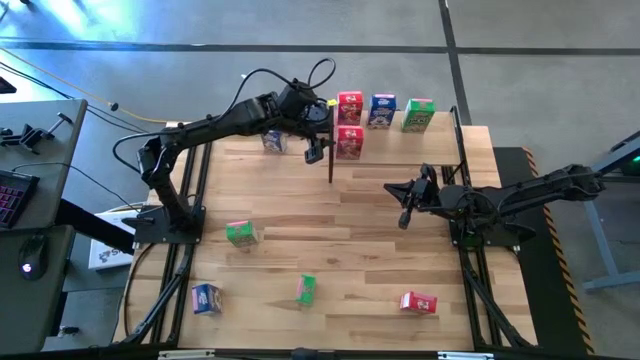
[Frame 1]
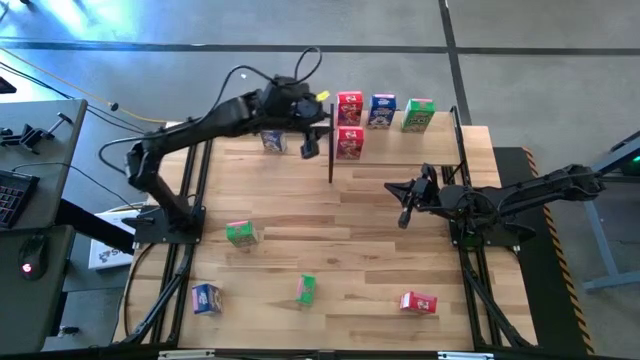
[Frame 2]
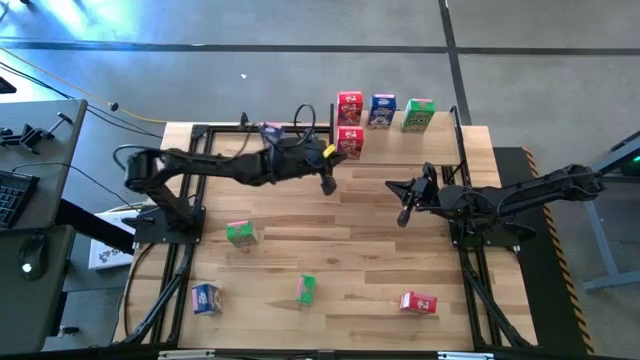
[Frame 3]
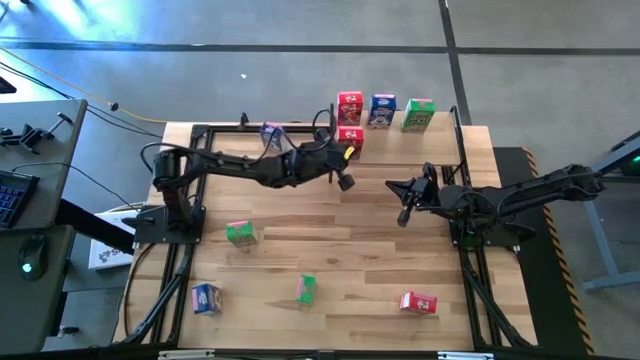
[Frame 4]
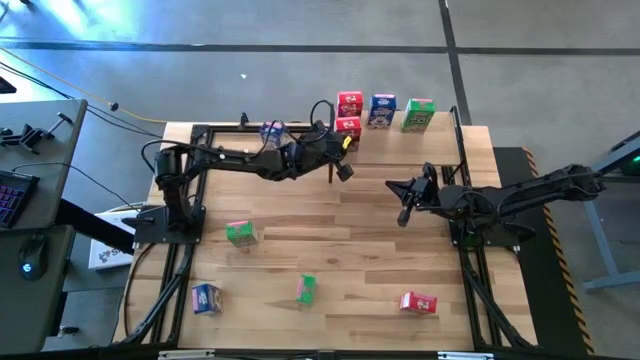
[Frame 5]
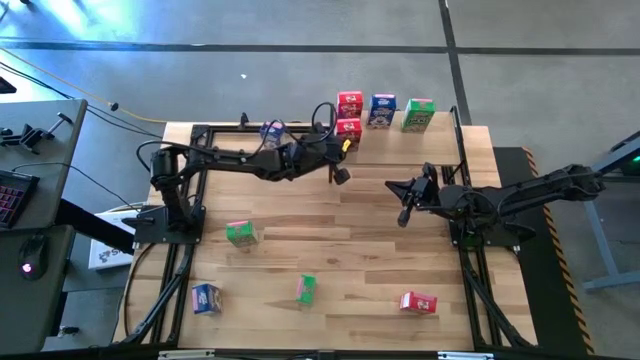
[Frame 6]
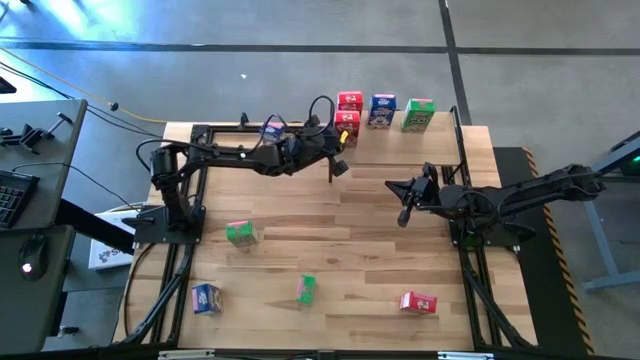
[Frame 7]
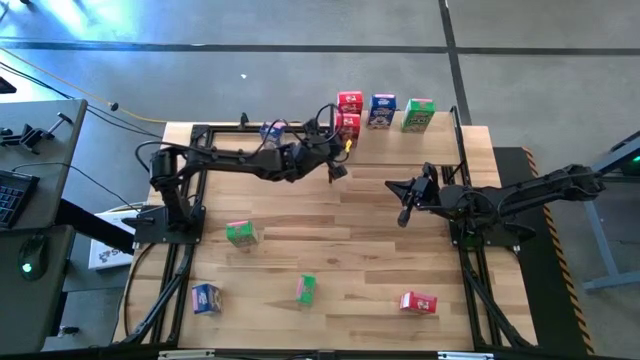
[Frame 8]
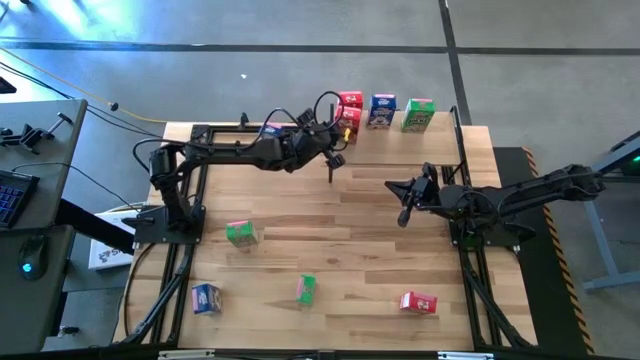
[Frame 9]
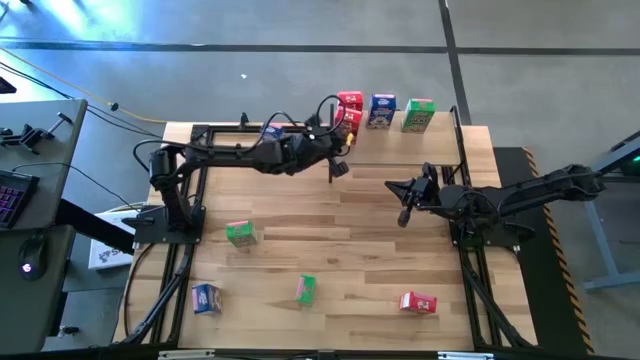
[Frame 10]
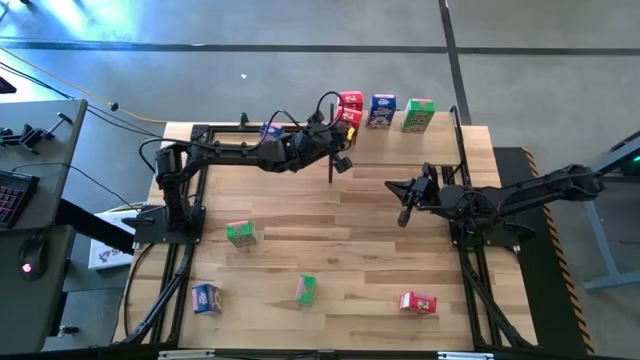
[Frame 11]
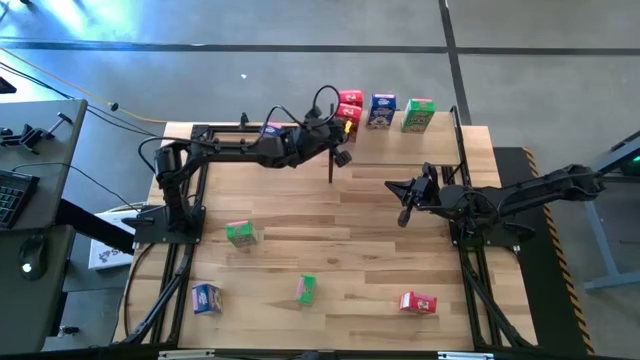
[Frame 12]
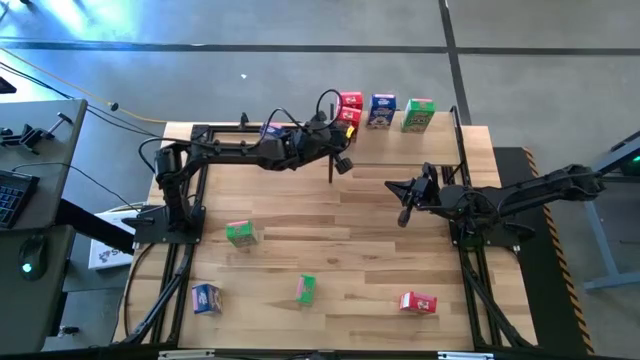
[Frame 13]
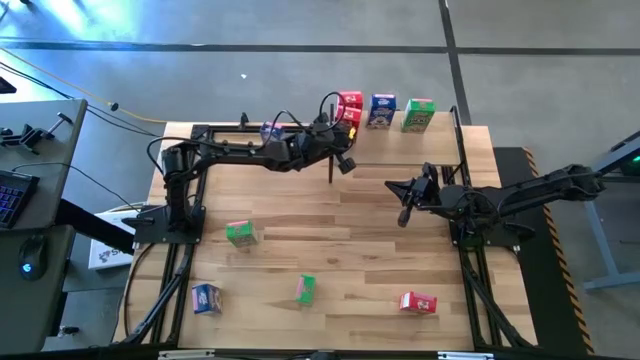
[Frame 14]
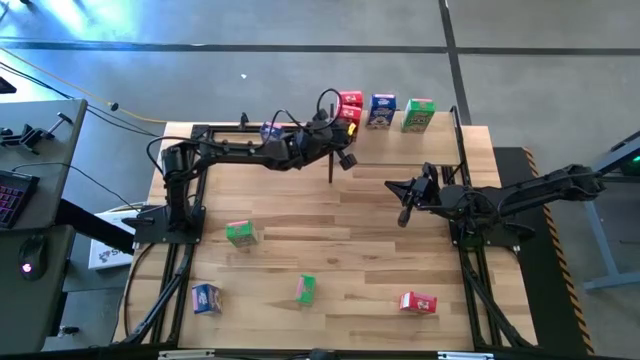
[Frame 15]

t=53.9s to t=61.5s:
Task: Stack cereal on shelf
Adjust the red cereal box

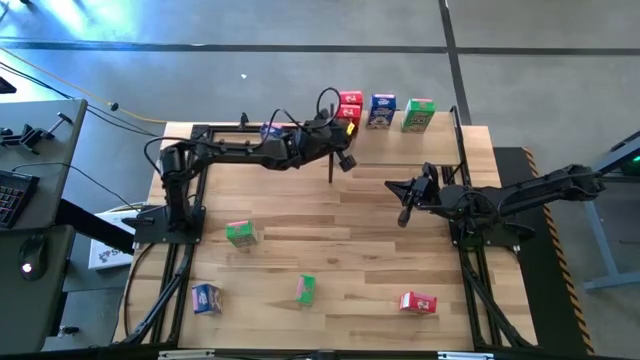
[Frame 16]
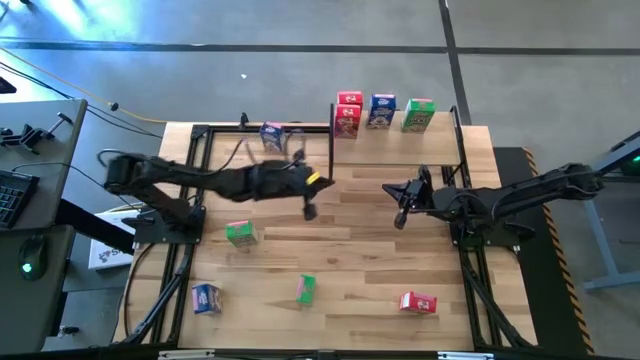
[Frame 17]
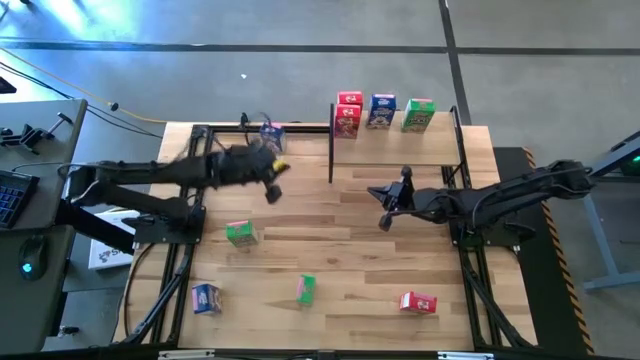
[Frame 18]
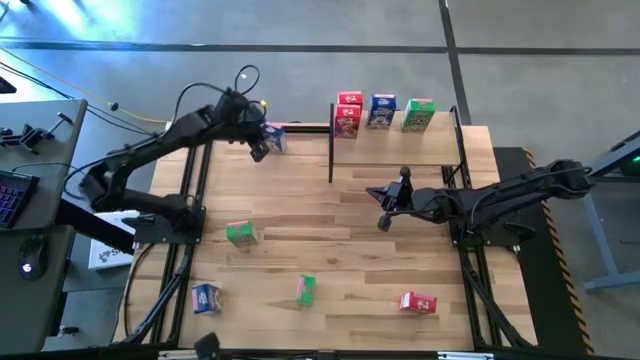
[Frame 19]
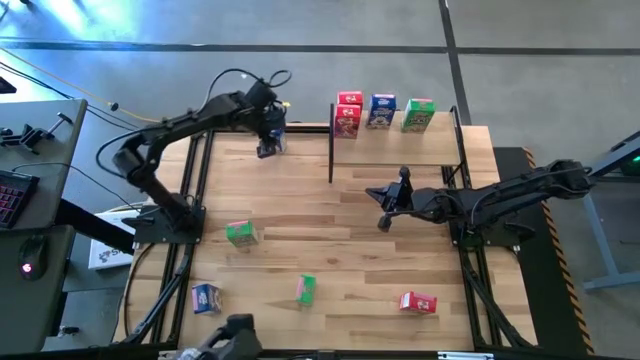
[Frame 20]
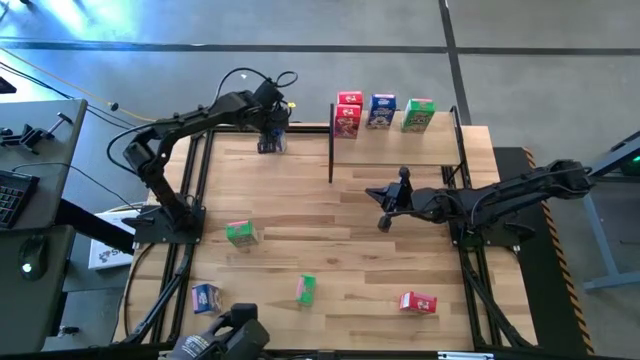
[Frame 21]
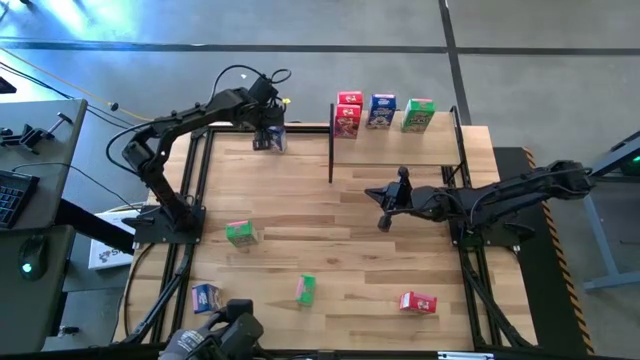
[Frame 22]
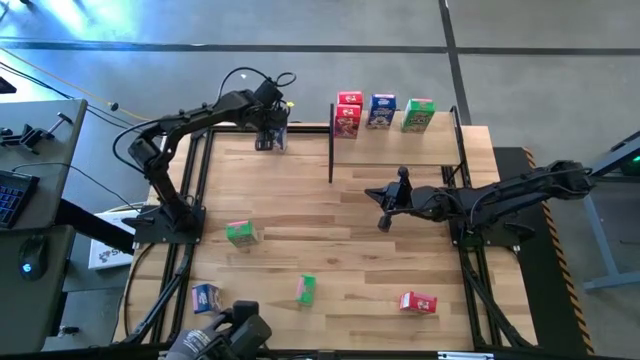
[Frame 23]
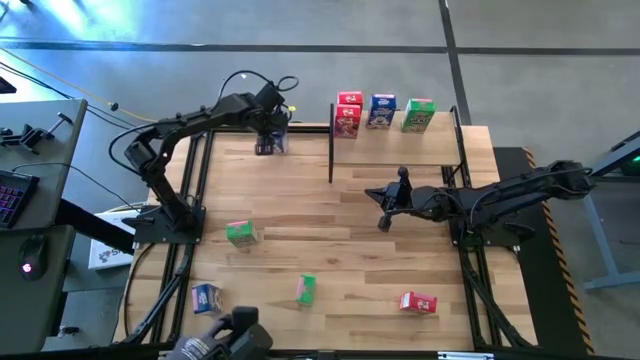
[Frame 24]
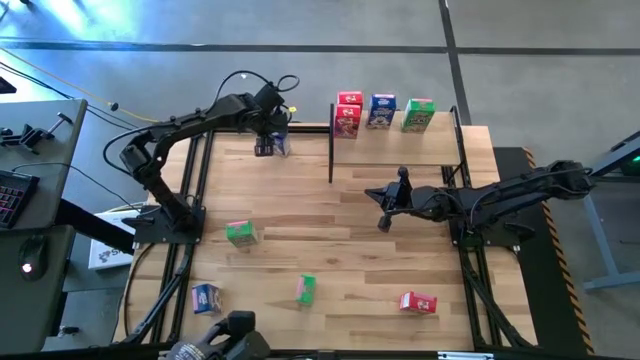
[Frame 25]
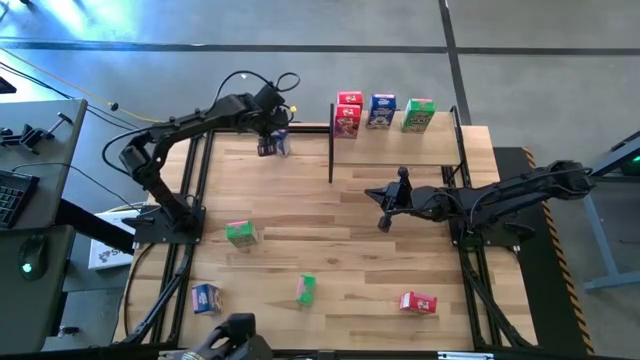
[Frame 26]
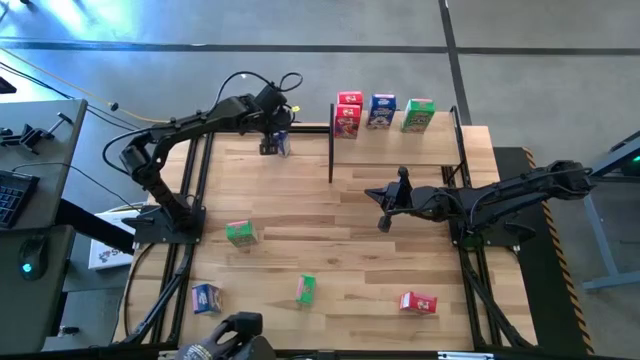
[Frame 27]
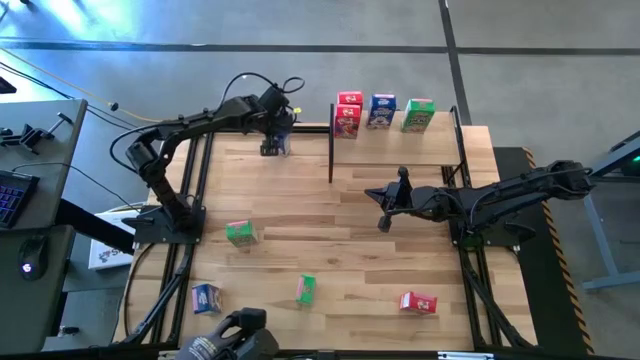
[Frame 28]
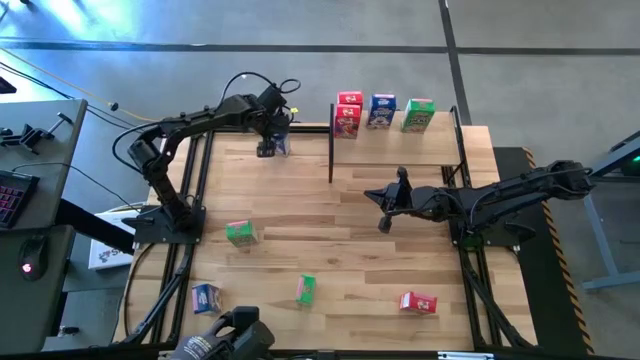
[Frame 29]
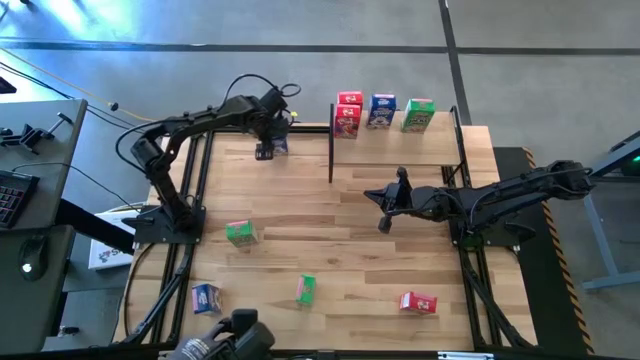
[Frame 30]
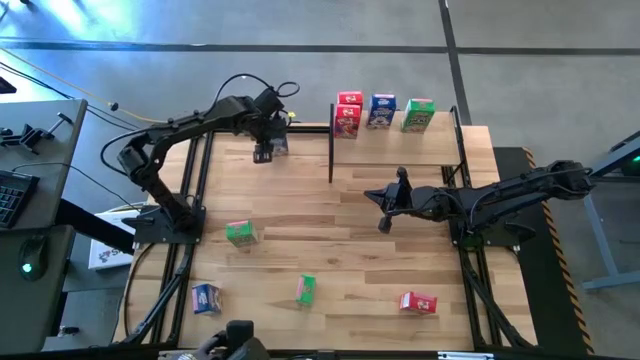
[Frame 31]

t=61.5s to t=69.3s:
Put the top blue cereal box on the shelf and aligned with the other blue cereal box

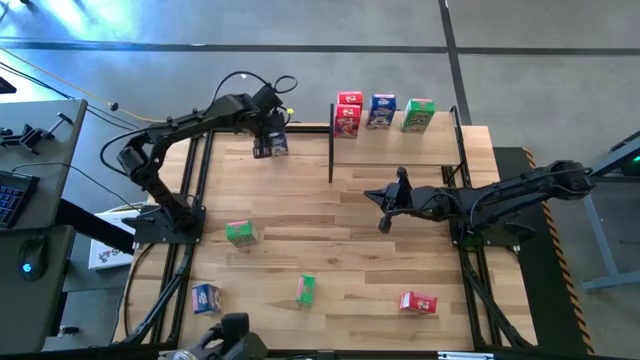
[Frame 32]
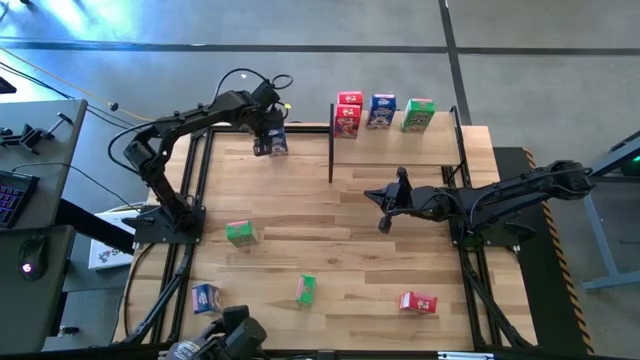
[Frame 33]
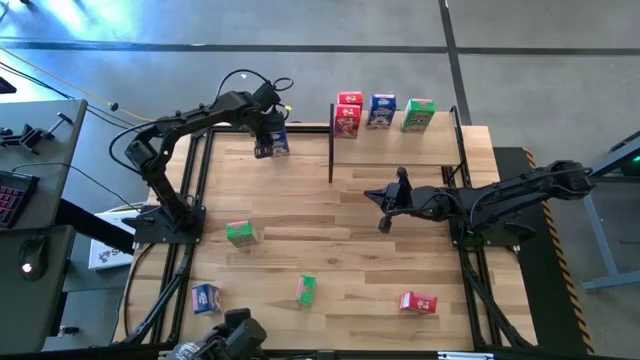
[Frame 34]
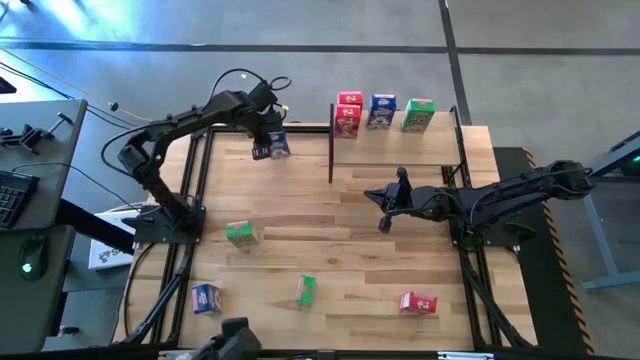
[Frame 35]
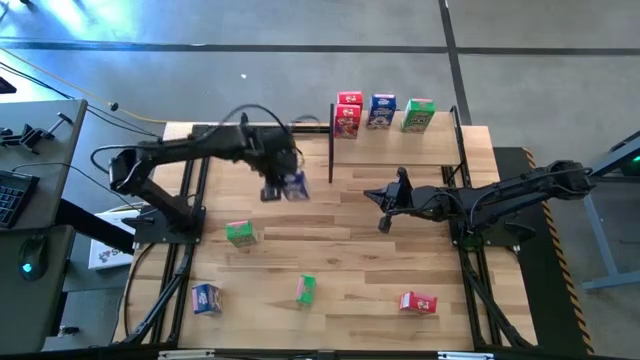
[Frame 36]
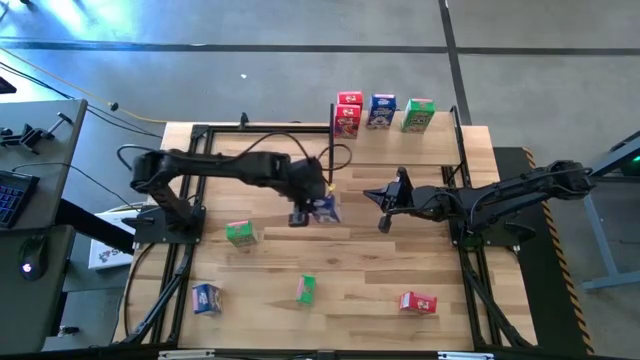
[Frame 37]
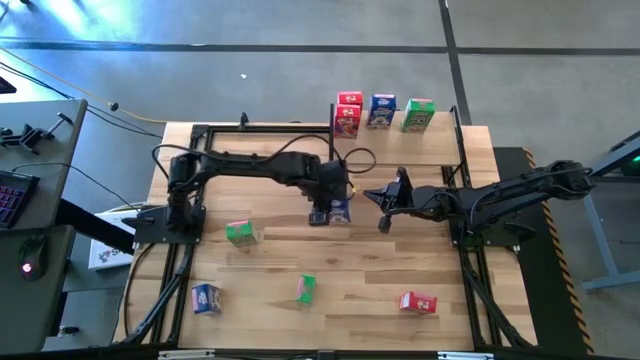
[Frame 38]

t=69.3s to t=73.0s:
Move the blue cereal box to the center of the table

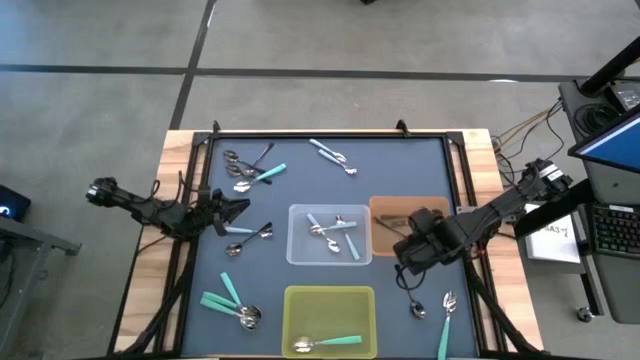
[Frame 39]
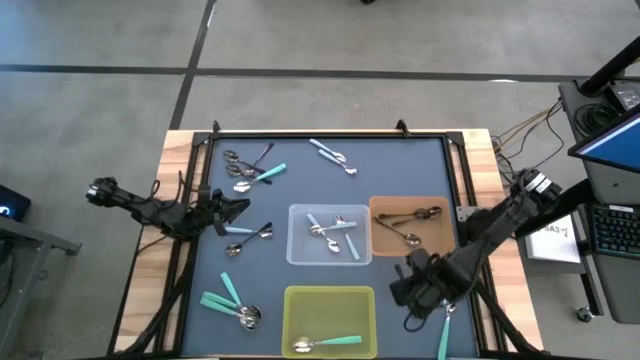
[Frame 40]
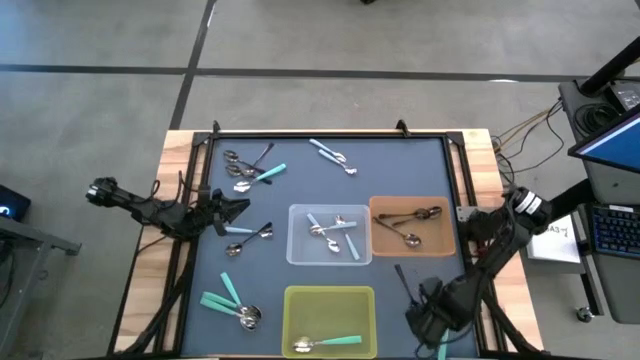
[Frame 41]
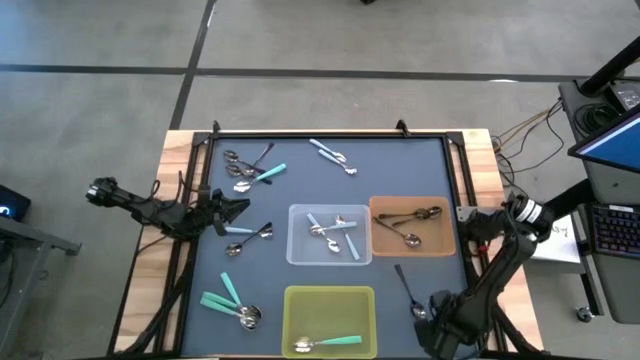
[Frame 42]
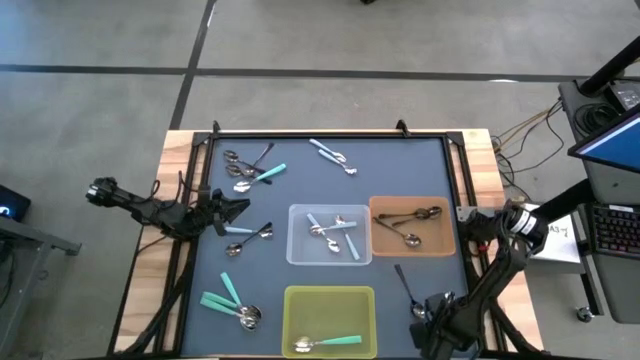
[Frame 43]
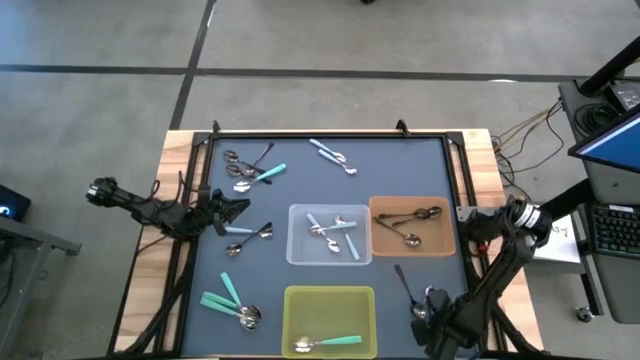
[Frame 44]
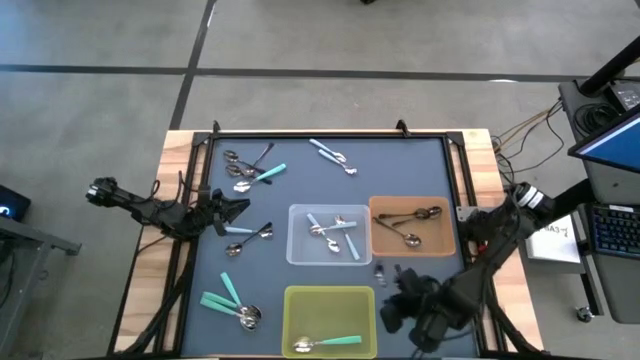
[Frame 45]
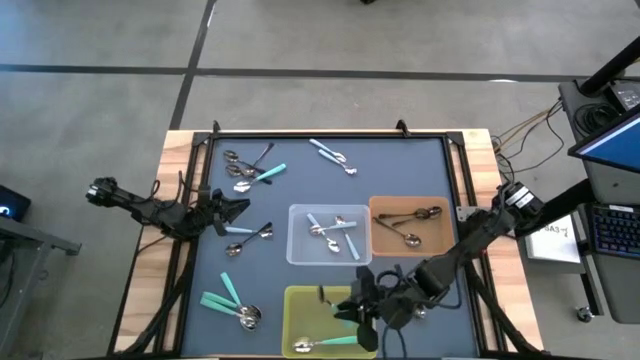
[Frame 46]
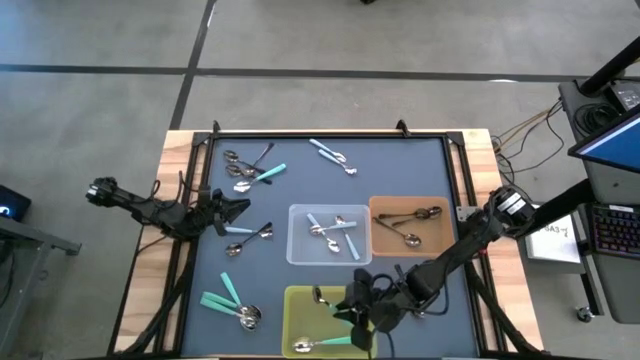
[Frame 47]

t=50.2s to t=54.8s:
Task: Sort silverware by color (type)
Put the light green spoon into the yellow bin
